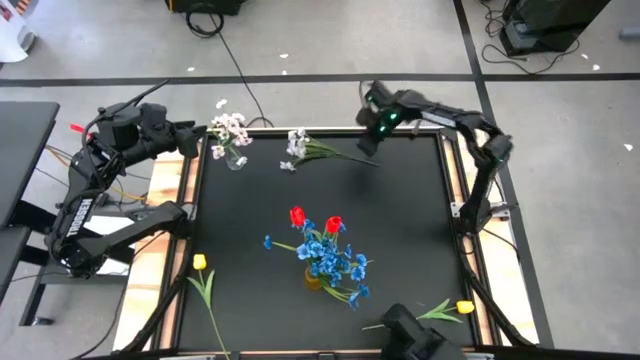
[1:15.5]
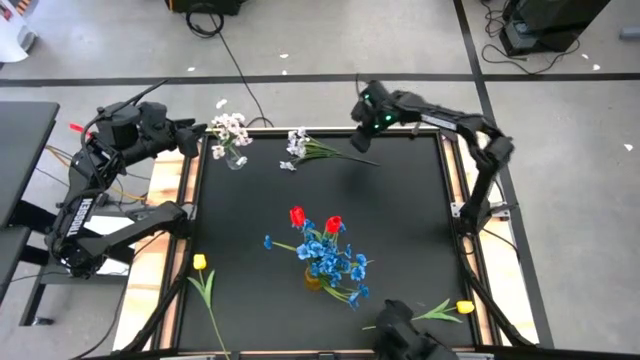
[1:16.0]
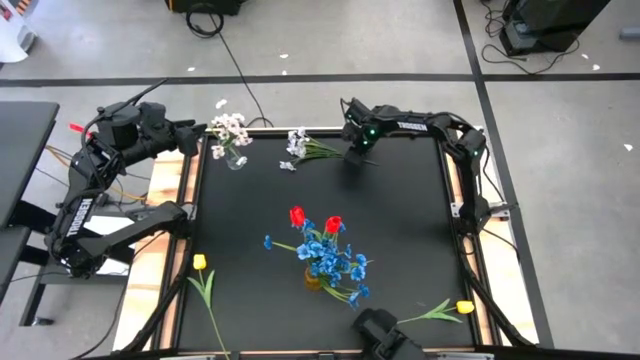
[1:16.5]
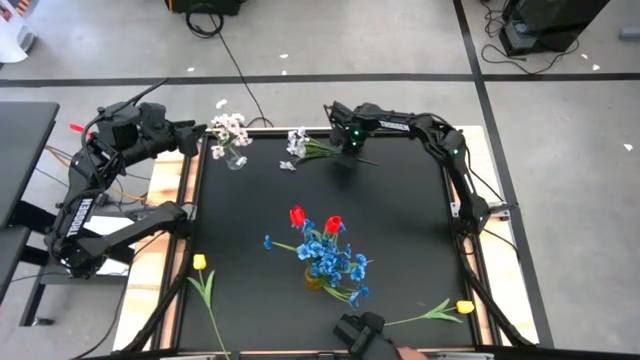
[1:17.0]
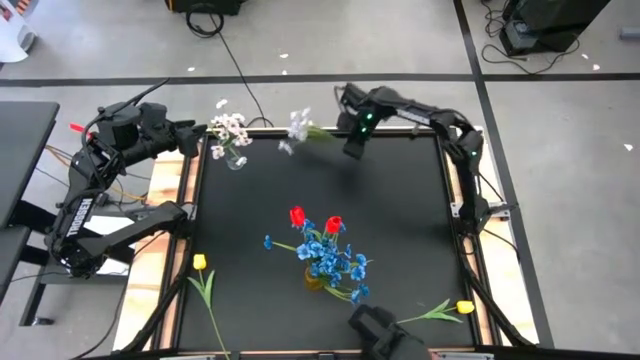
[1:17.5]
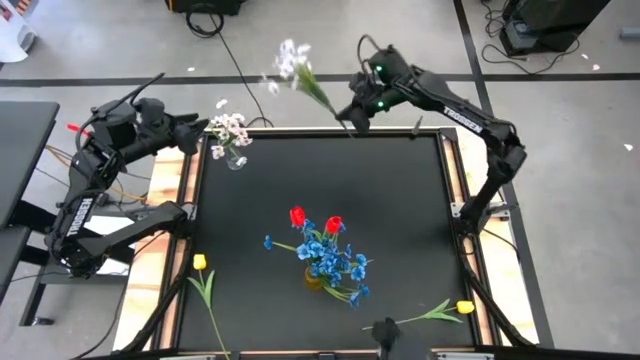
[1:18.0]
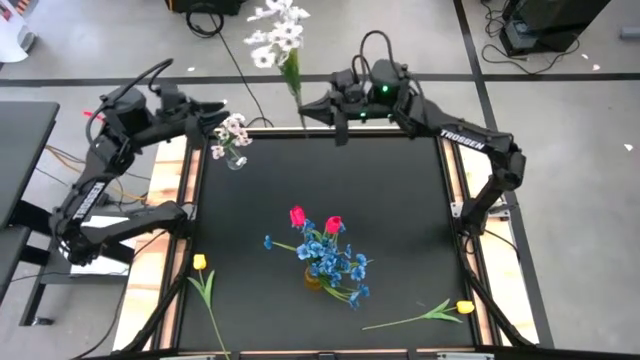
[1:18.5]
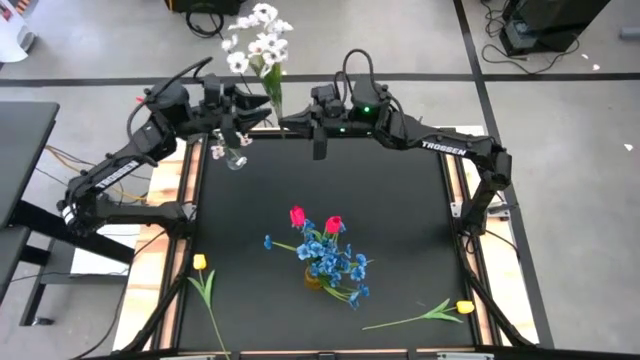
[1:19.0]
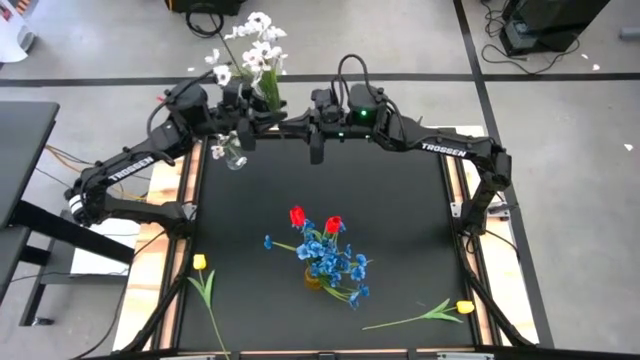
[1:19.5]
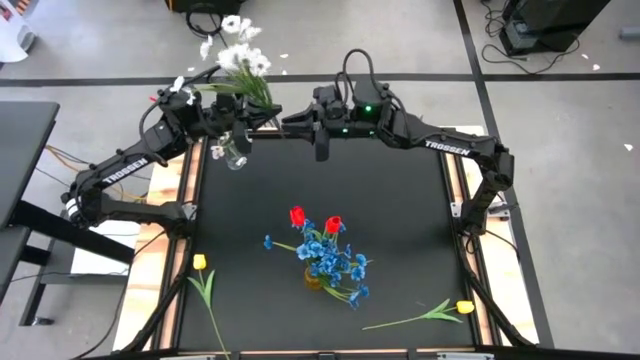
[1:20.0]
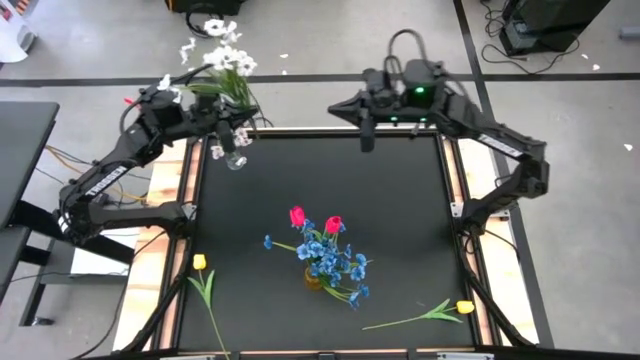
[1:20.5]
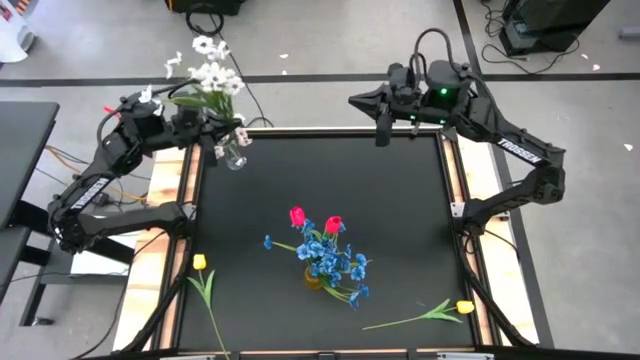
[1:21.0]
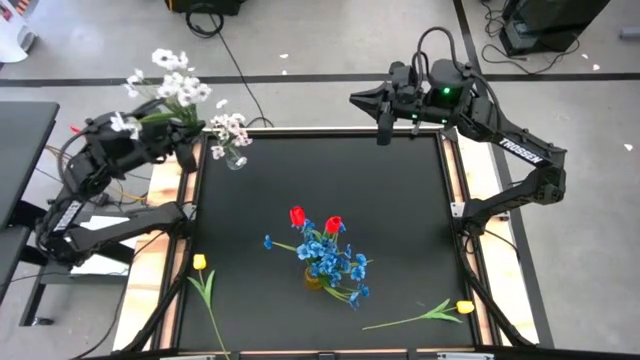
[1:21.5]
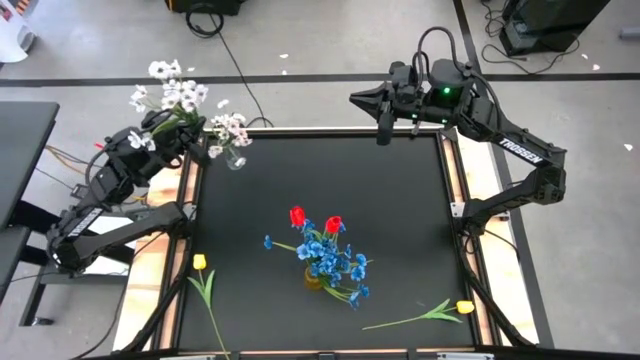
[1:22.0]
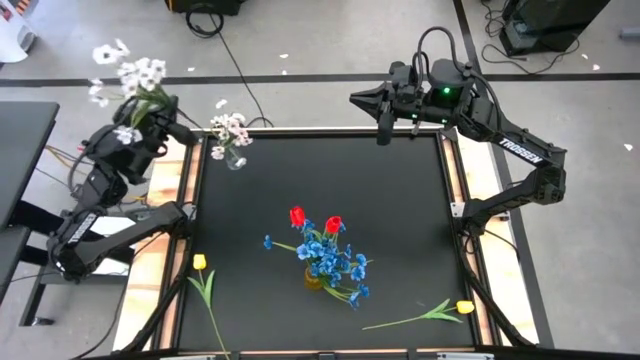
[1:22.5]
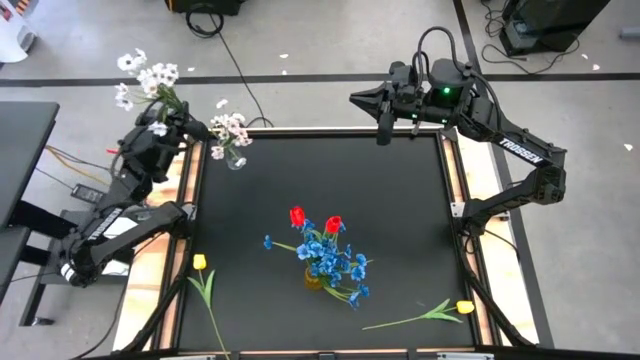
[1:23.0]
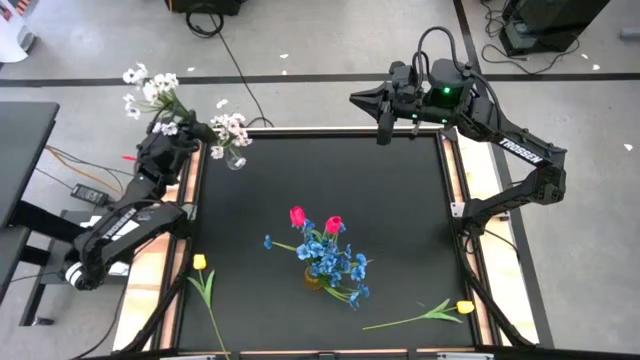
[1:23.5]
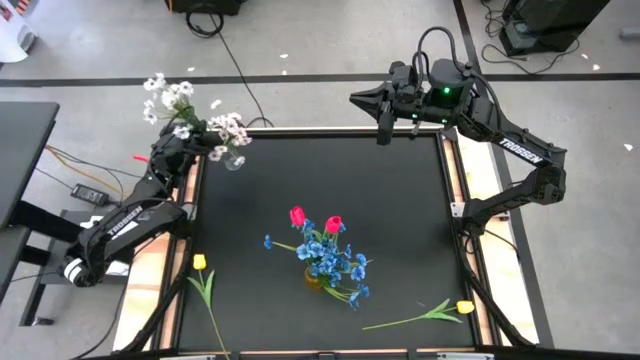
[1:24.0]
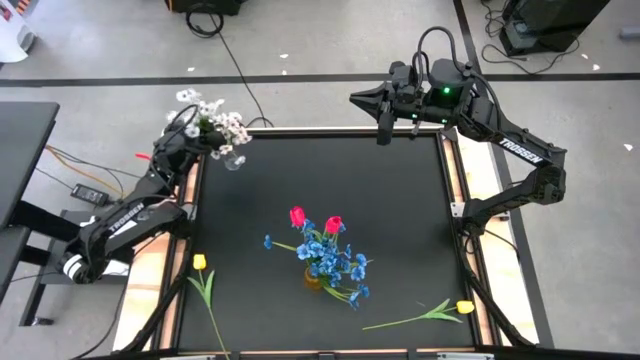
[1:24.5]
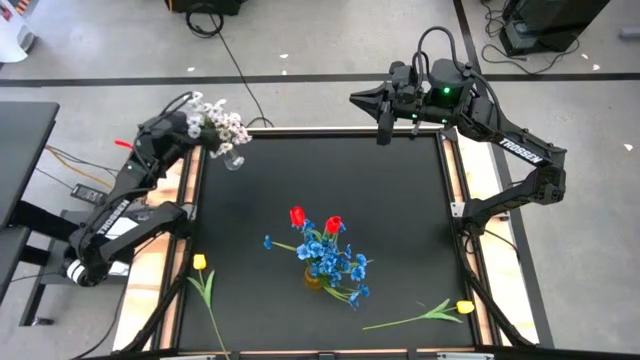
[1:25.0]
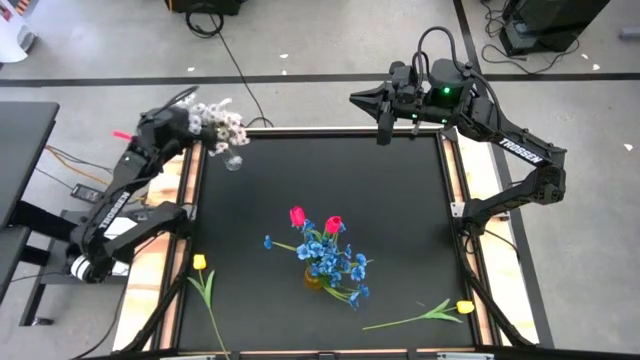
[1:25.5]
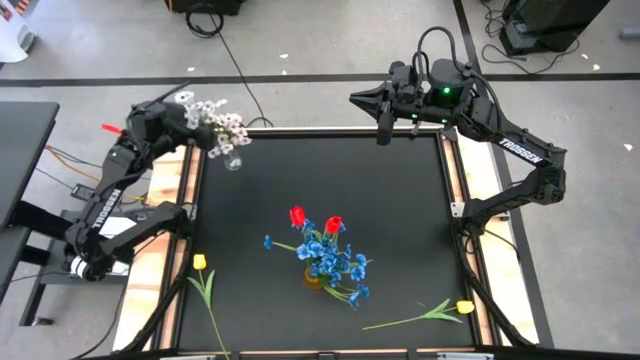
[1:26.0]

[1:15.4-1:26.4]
Task: Sort flowers into vase by color
Put the white flowers into the transparent vase

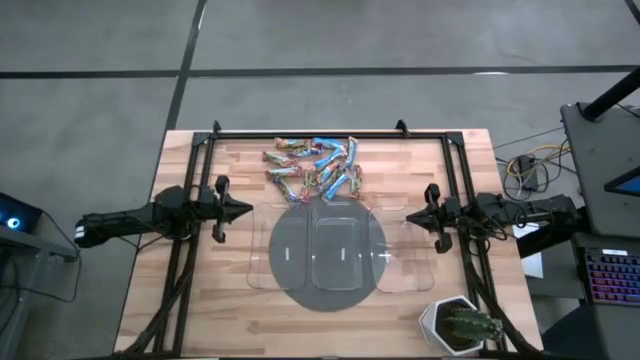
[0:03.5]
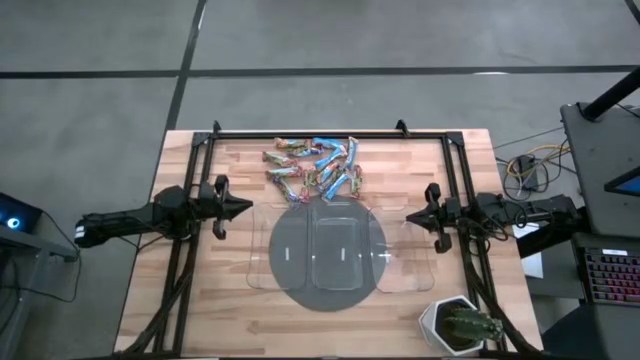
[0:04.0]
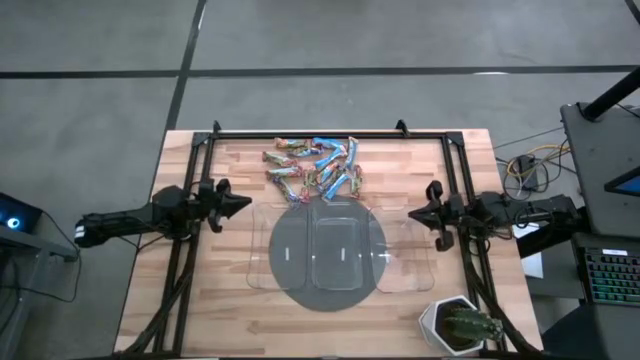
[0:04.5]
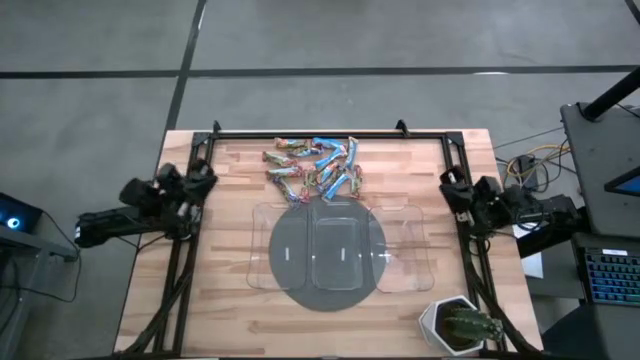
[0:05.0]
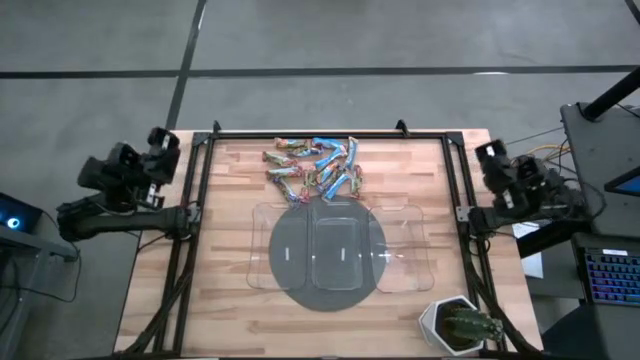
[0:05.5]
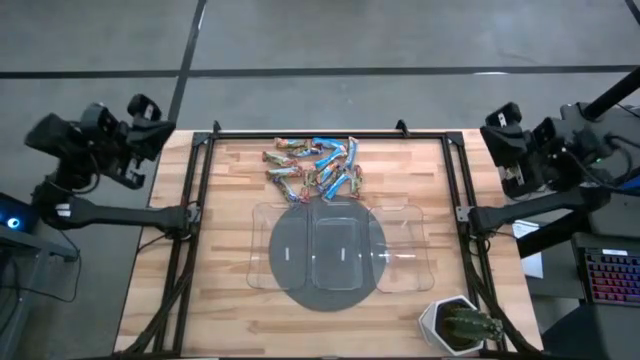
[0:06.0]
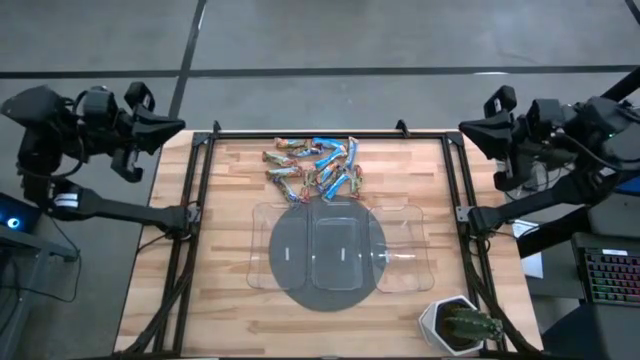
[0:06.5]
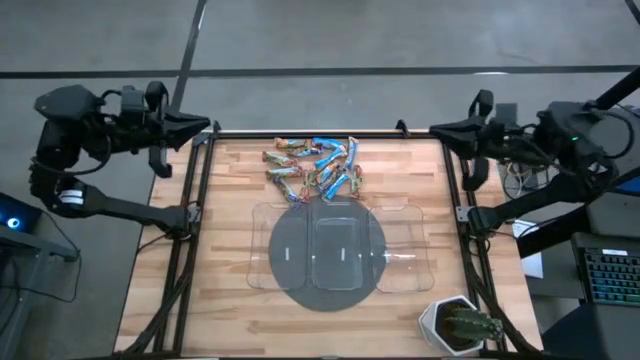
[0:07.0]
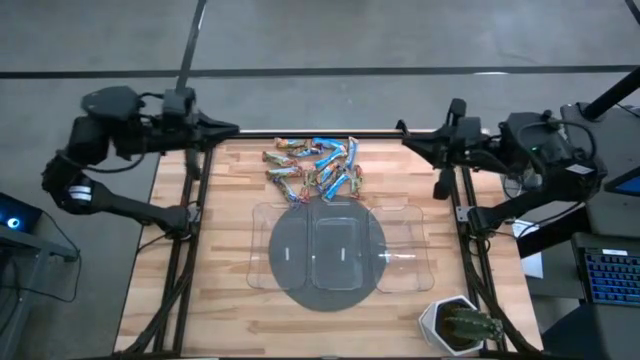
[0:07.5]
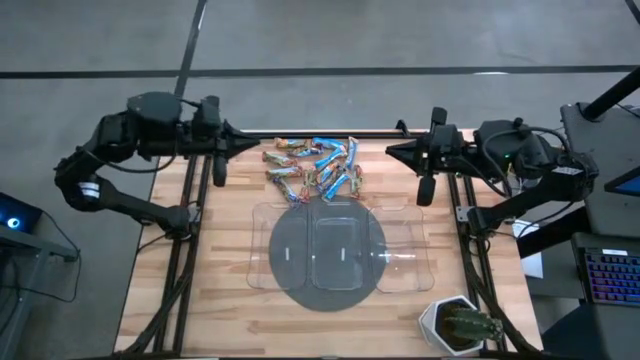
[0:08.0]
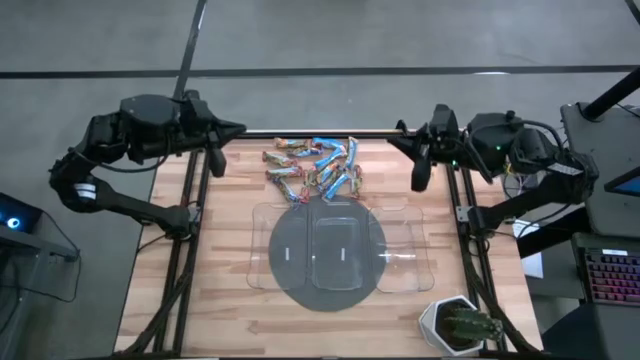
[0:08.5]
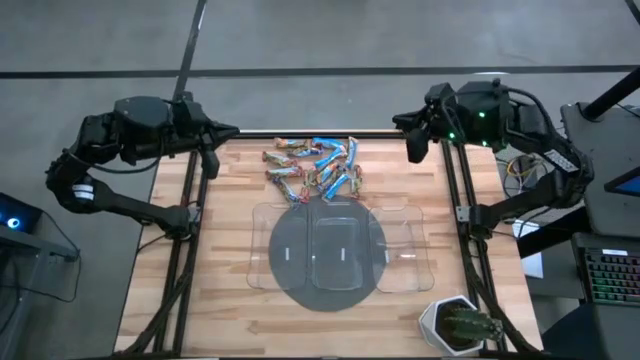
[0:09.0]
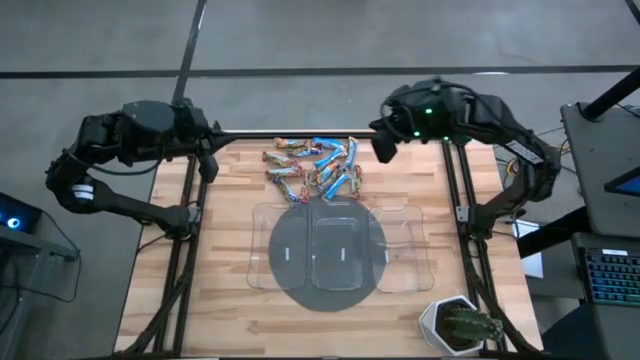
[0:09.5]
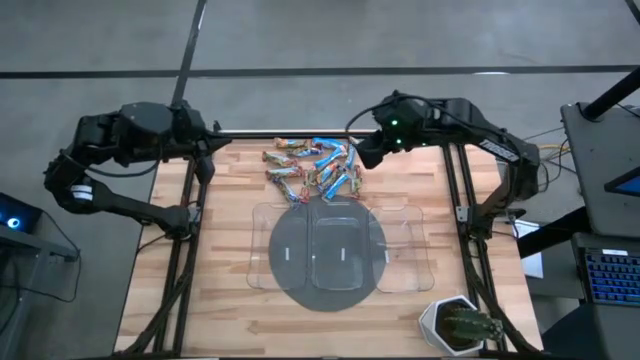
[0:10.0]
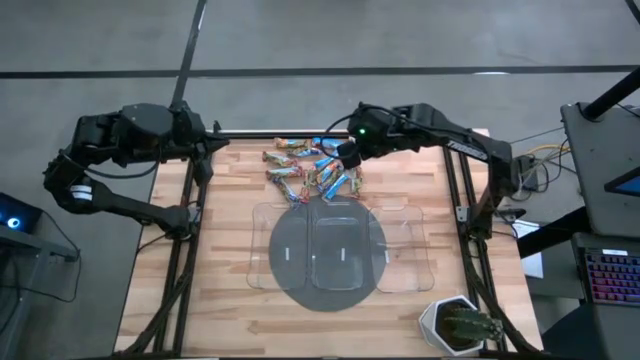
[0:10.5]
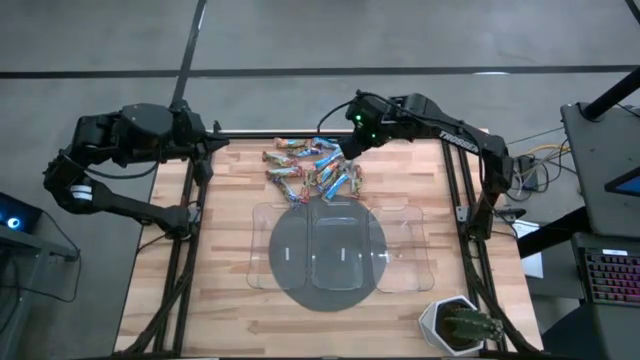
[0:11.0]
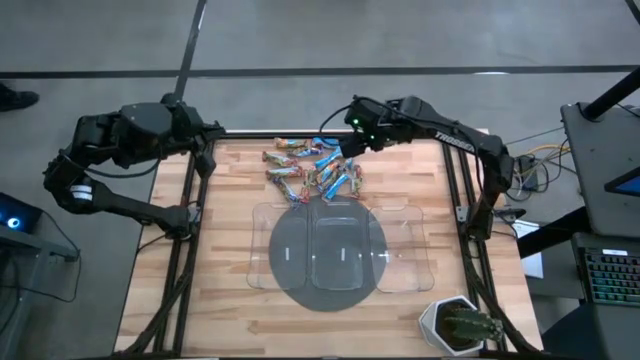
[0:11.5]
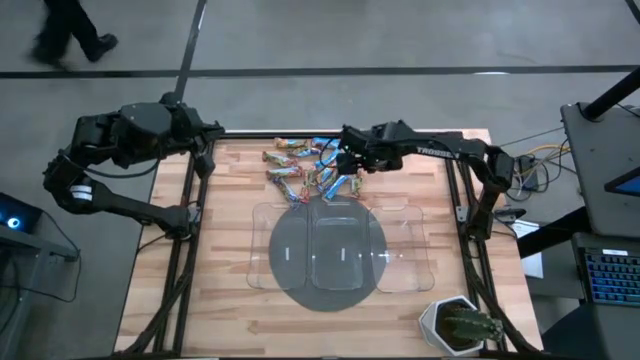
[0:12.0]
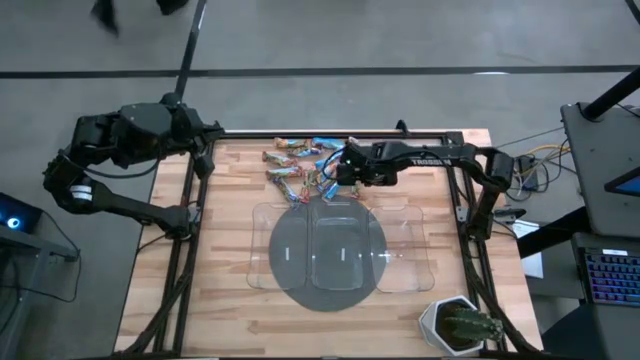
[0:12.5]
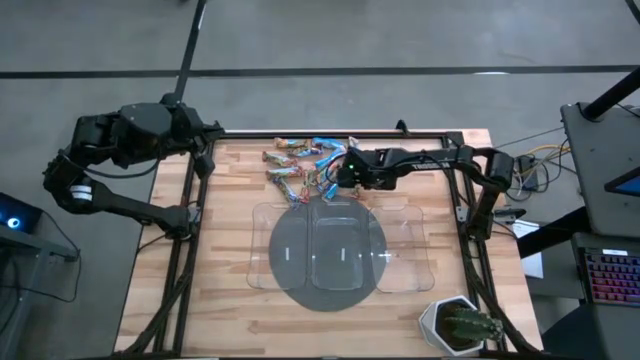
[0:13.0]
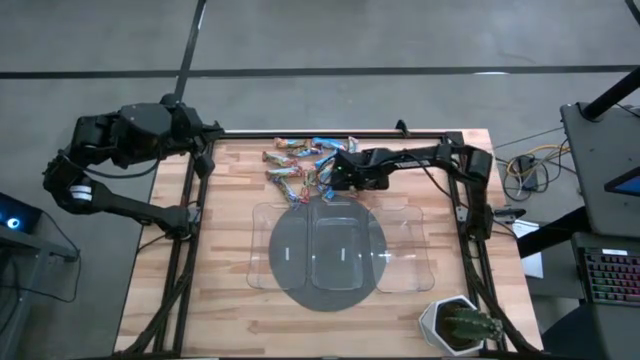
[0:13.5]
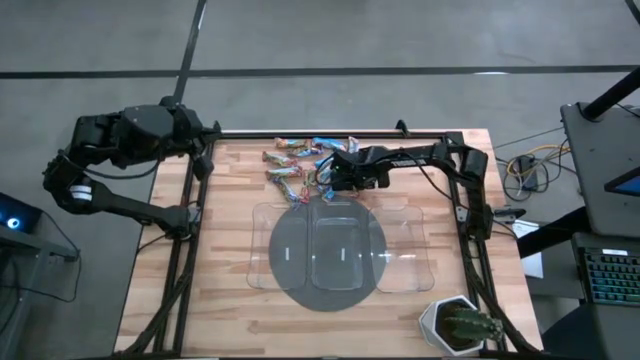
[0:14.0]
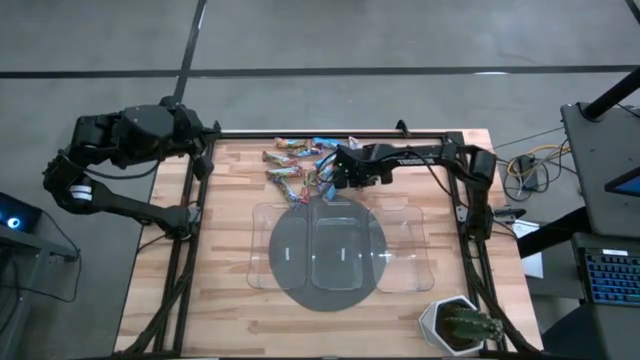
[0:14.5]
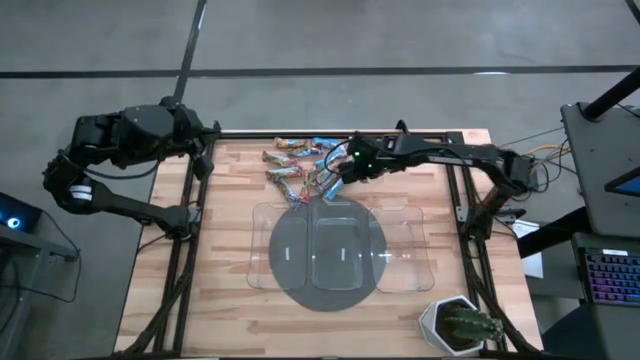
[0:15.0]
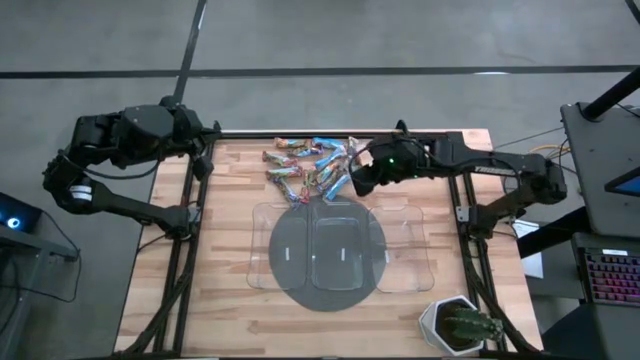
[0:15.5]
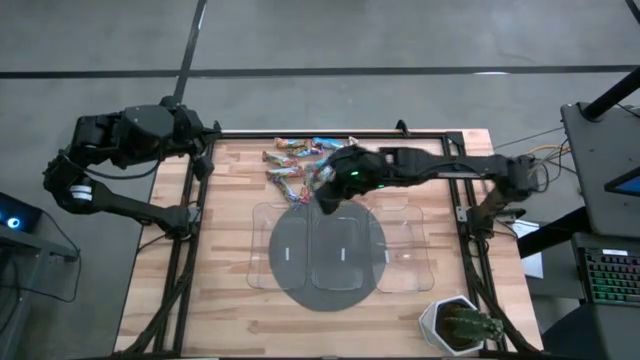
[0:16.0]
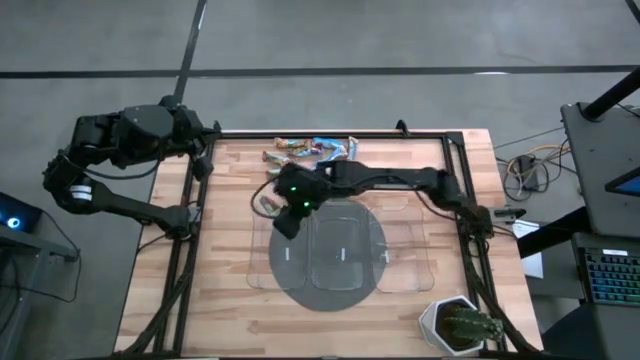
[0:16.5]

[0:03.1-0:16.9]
Task: Pick and place Granola Bars by type
Put the red granola bar into the left transparent bin
